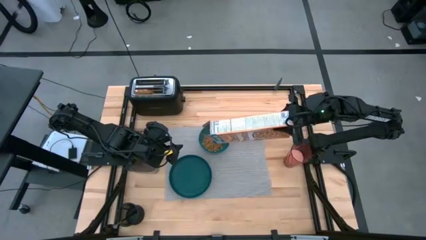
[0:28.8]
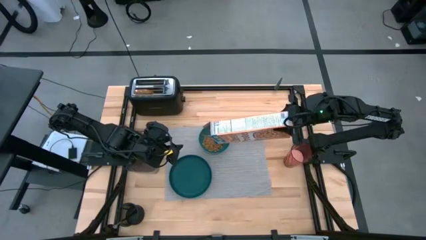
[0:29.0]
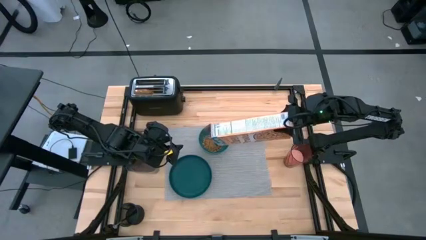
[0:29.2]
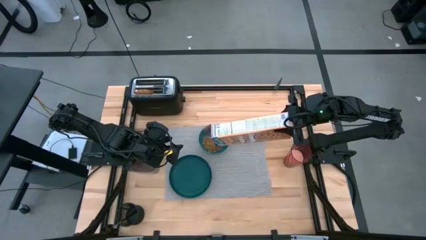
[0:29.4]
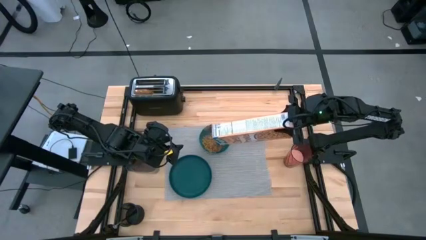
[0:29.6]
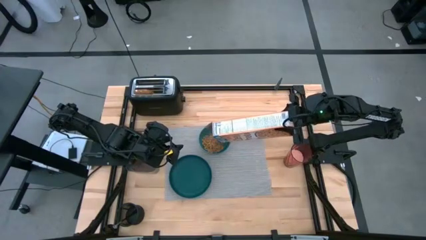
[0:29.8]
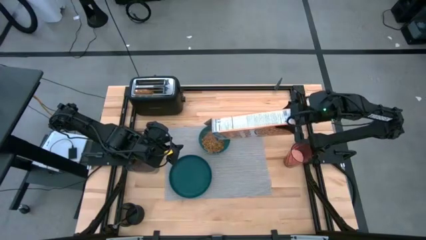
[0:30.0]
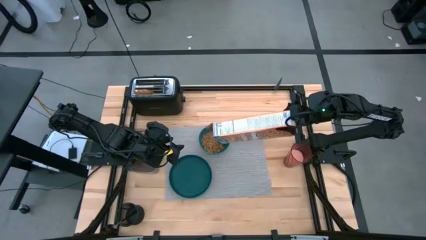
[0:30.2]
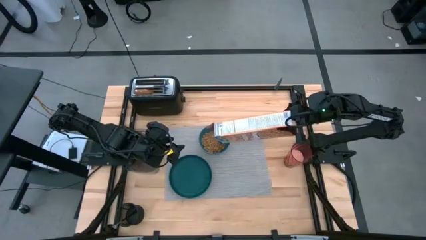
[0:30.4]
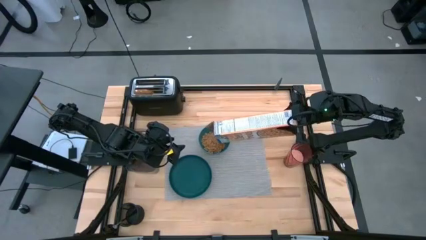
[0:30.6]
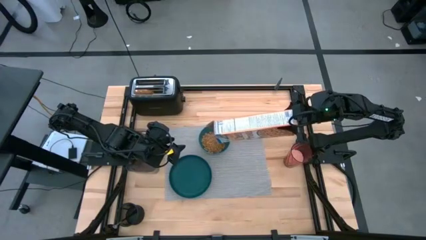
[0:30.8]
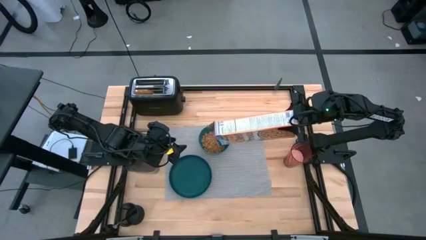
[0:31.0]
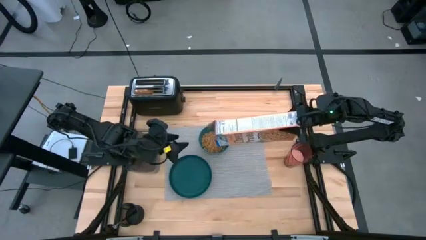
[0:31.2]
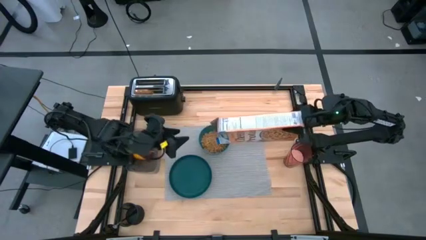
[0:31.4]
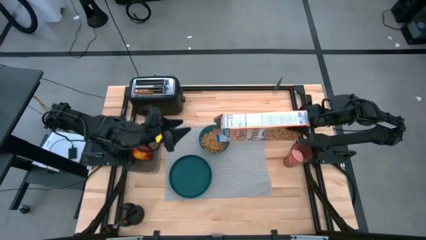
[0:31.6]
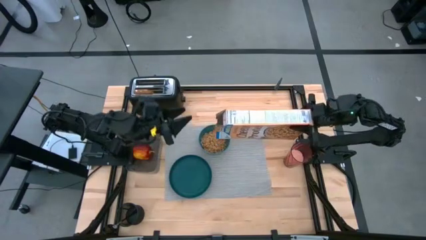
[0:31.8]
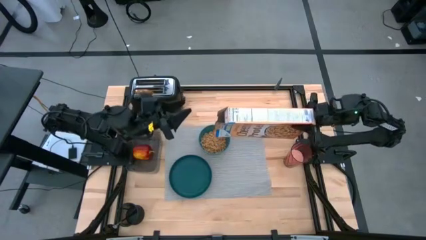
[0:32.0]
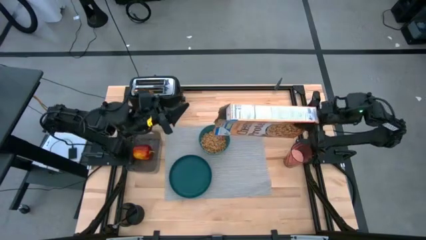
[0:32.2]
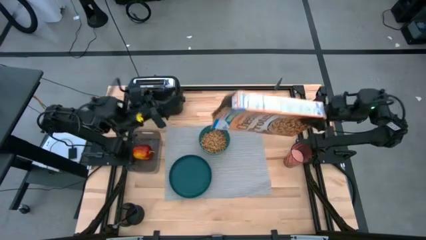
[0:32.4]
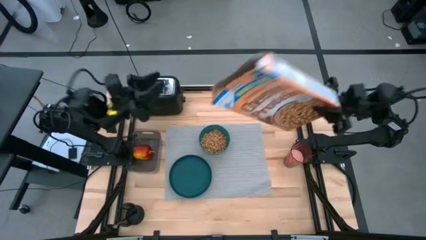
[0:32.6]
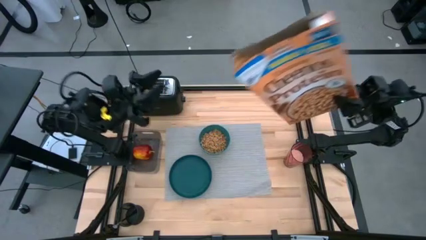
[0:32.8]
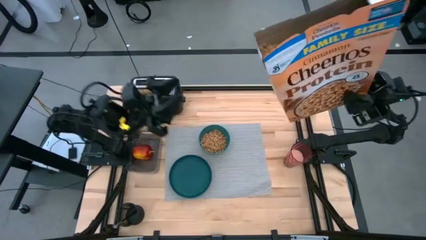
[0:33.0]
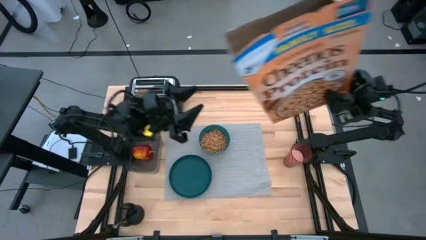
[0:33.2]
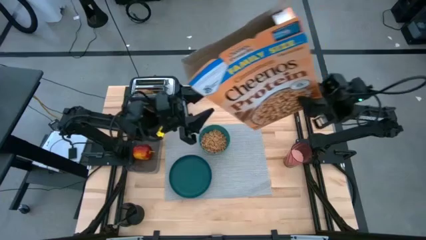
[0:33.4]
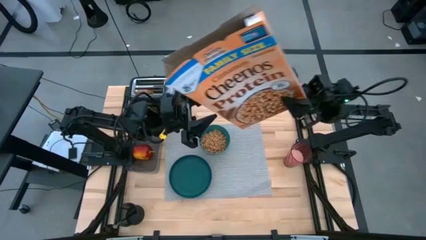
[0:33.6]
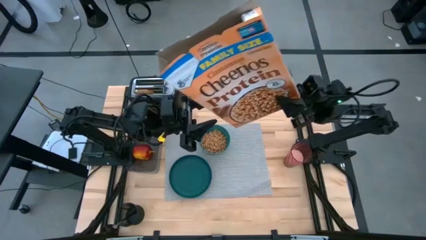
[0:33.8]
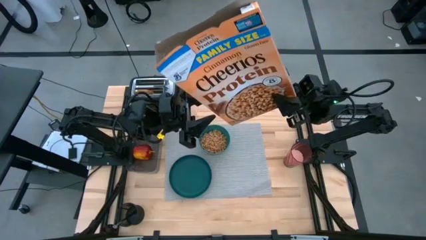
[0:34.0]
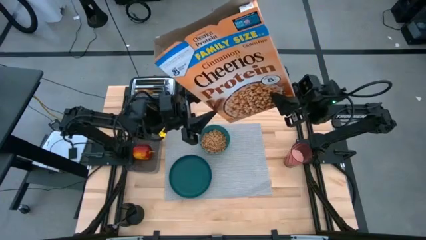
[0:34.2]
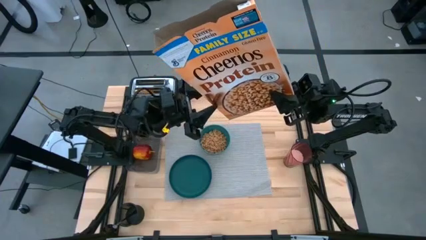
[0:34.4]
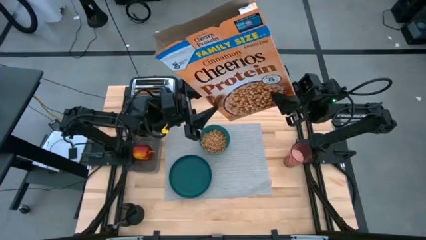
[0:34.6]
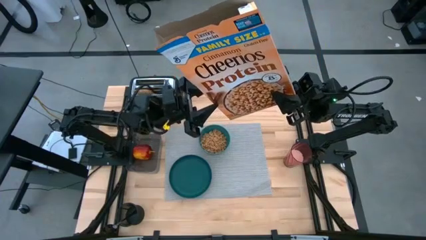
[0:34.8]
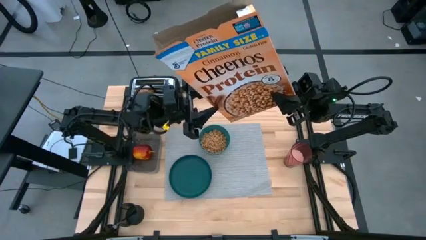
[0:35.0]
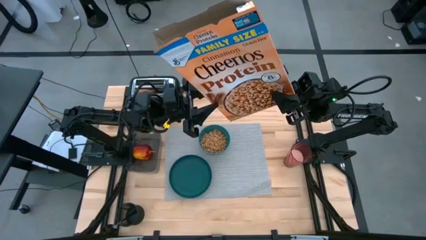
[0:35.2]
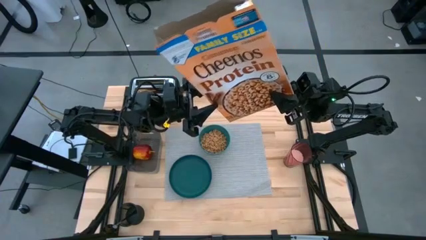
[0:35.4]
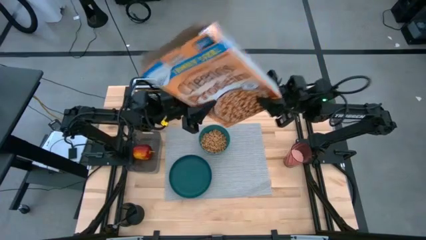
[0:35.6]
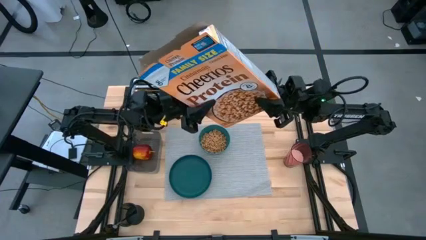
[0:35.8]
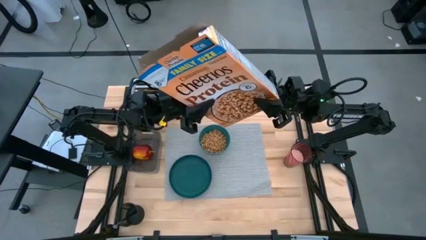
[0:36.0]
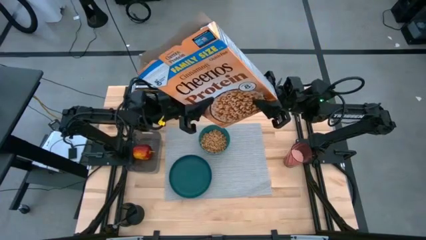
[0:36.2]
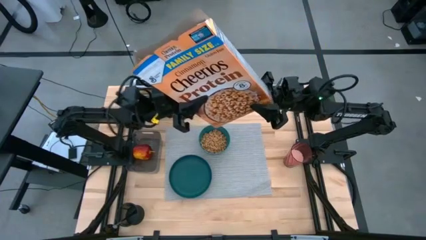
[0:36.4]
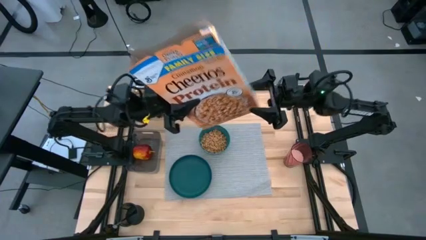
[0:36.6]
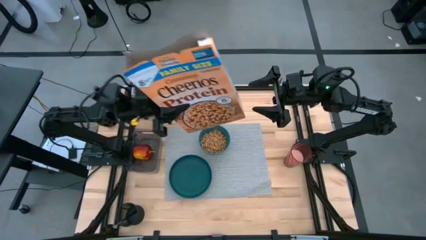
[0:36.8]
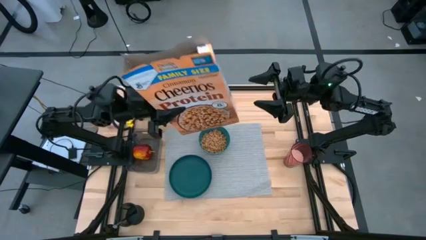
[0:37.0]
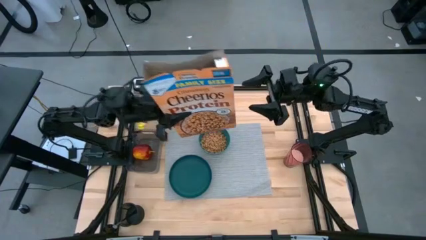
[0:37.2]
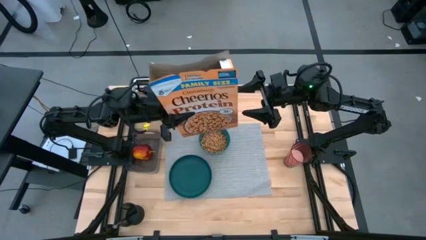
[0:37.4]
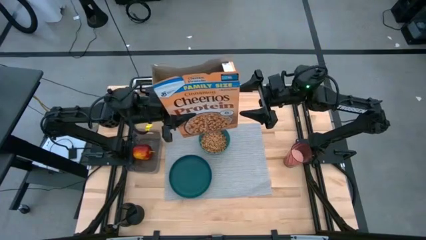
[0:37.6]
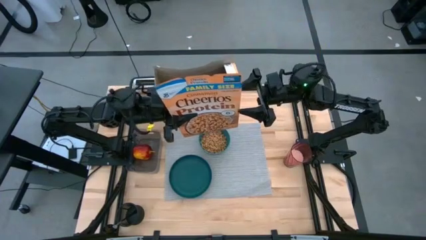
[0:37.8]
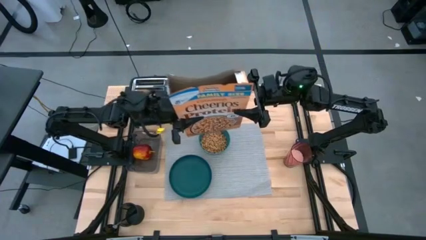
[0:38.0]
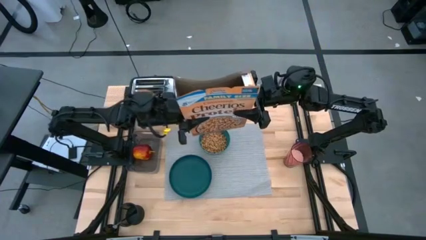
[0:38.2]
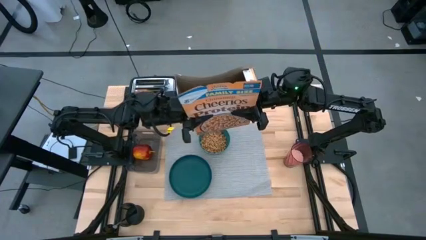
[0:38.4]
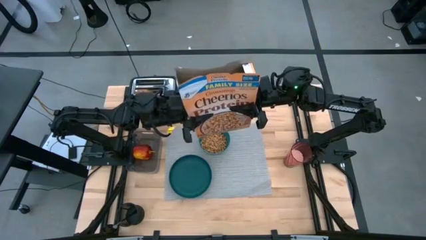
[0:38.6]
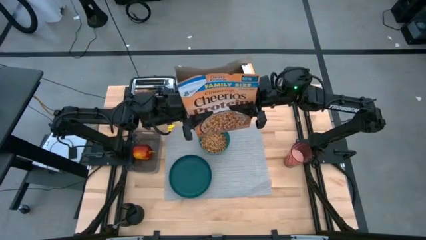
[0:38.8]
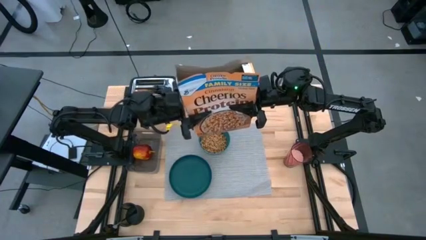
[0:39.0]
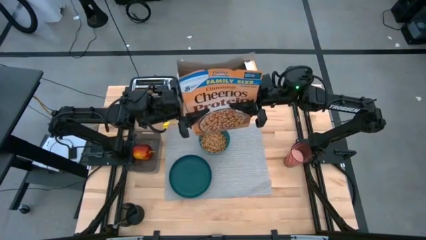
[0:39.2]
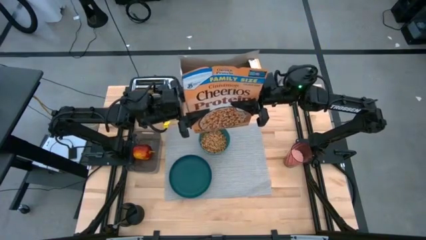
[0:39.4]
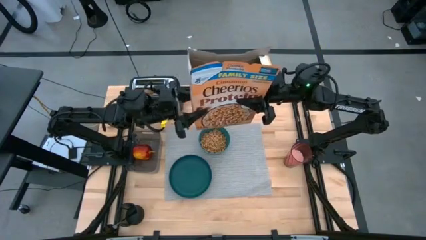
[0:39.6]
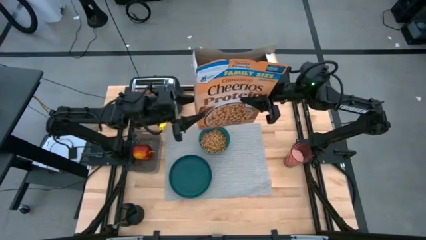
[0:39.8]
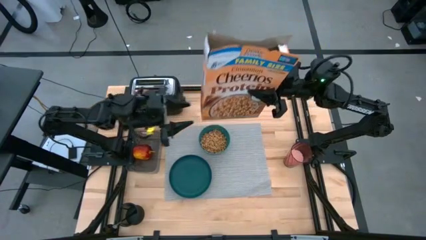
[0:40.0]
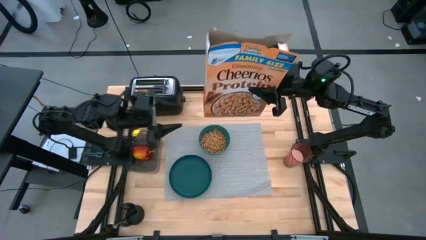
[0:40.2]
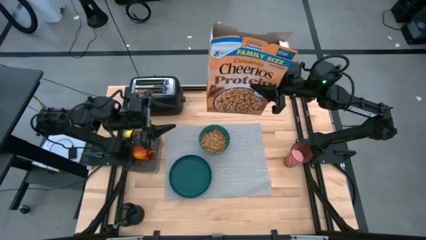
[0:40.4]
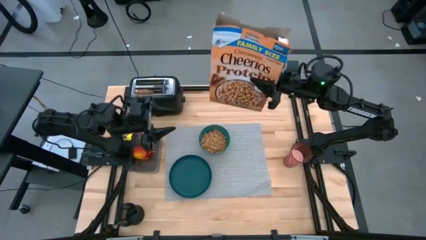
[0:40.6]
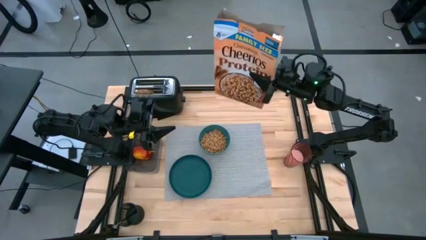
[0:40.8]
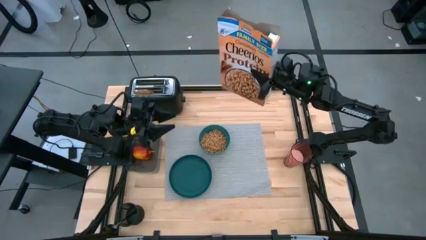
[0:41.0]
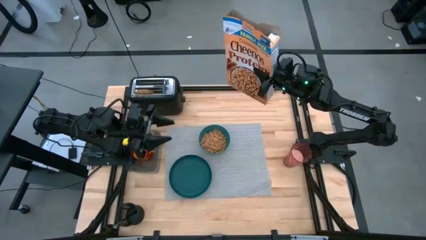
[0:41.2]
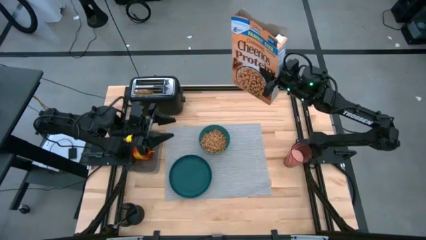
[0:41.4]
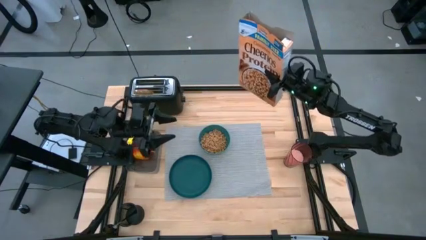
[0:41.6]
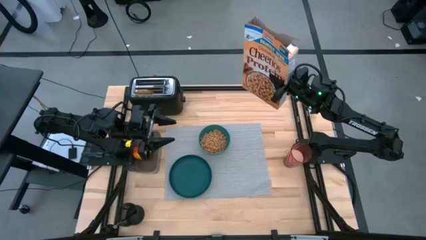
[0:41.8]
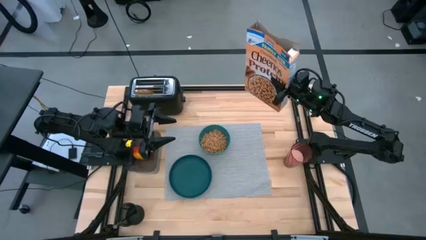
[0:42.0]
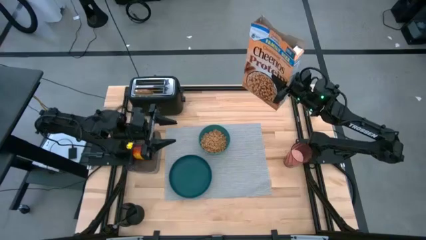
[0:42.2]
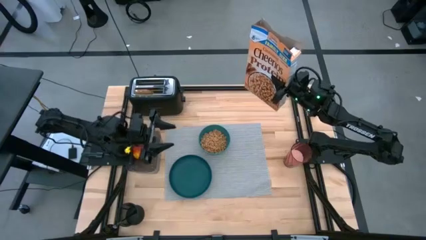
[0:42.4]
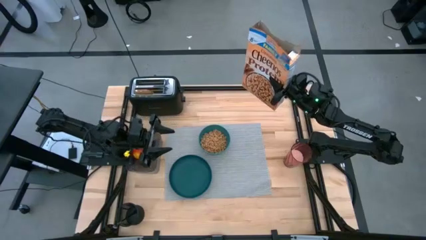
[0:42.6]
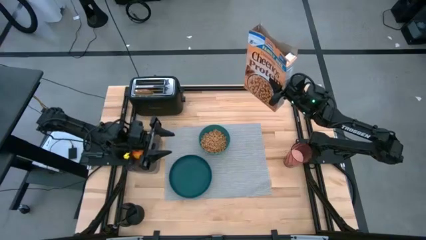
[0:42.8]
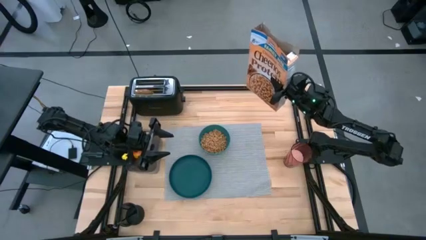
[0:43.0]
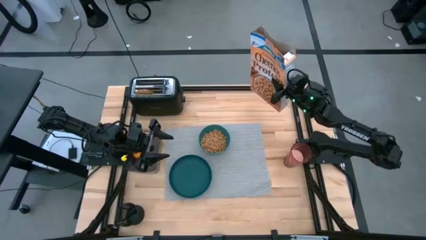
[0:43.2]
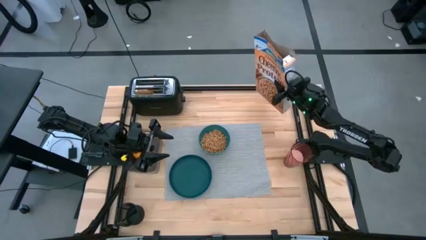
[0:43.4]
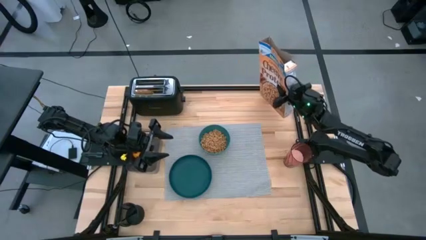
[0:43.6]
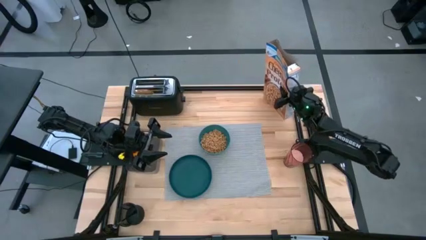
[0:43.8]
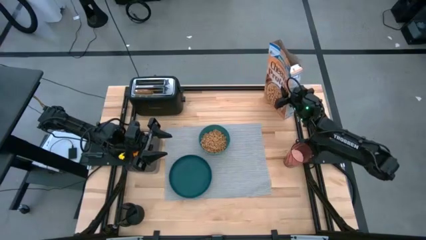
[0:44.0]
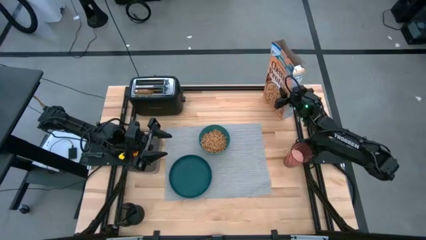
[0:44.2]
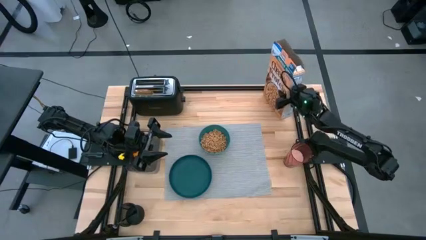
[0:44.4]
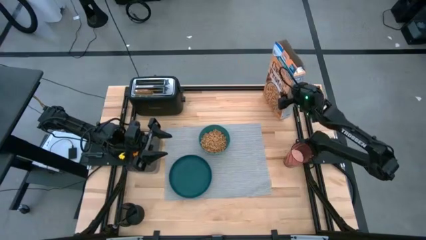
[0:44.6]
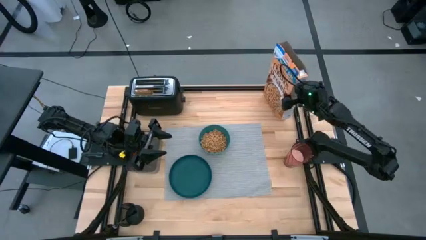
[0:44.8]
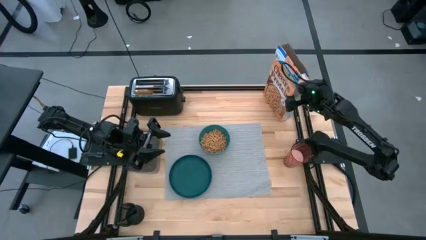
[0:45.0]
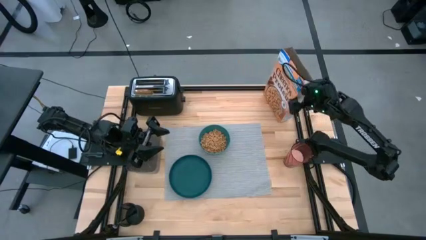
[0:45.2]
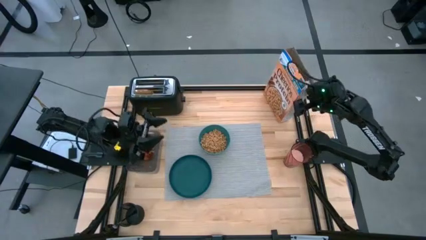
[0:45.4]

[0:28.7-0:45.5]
Task: Arrange a breakfast setting
Pour the cereal in the green bowl
